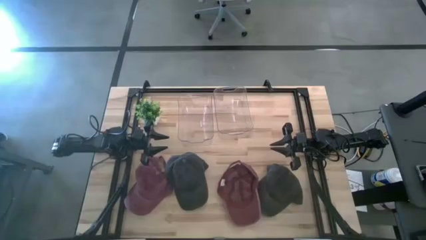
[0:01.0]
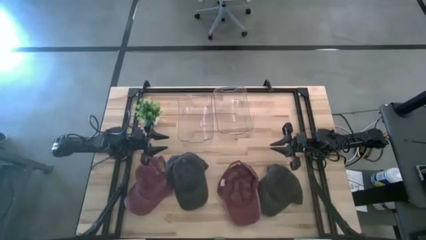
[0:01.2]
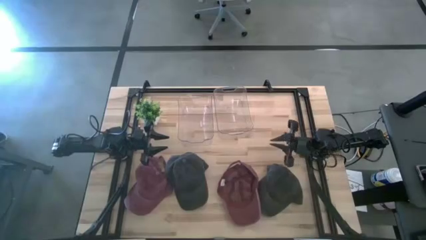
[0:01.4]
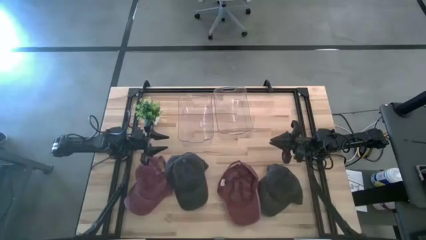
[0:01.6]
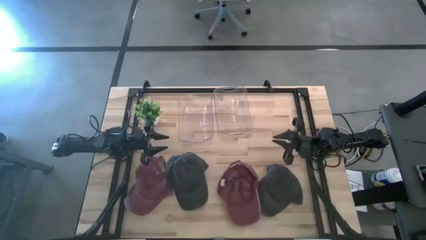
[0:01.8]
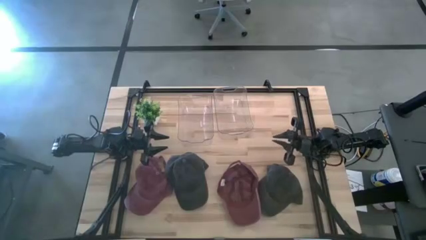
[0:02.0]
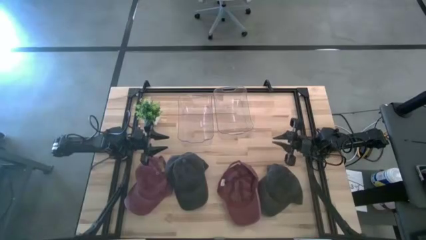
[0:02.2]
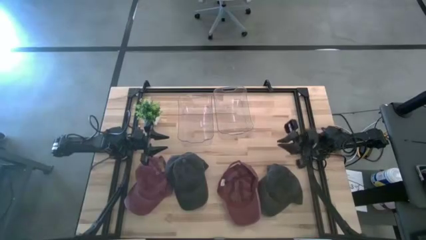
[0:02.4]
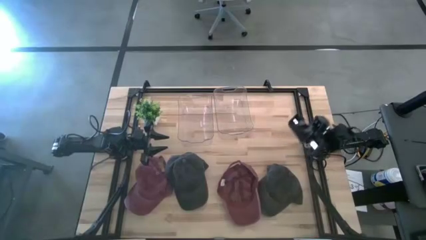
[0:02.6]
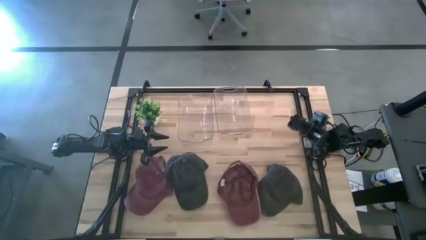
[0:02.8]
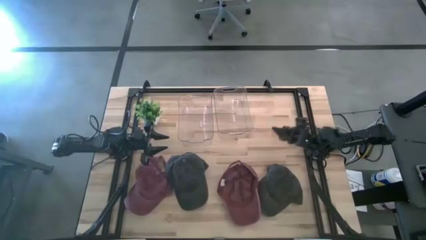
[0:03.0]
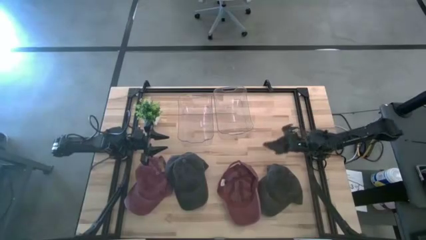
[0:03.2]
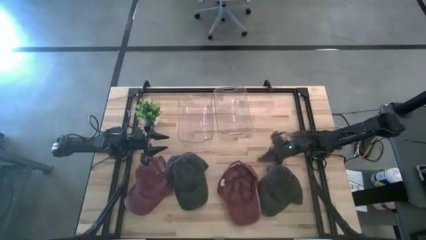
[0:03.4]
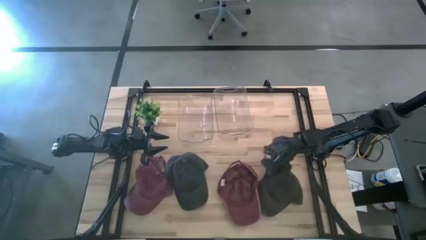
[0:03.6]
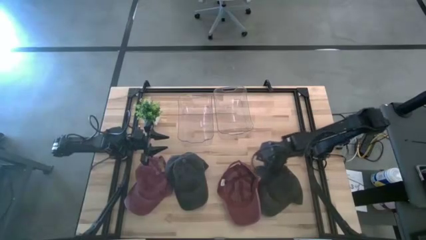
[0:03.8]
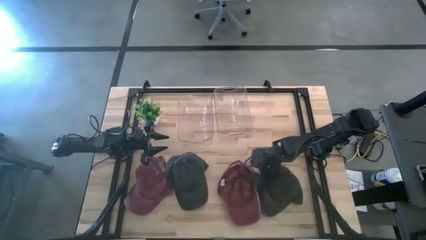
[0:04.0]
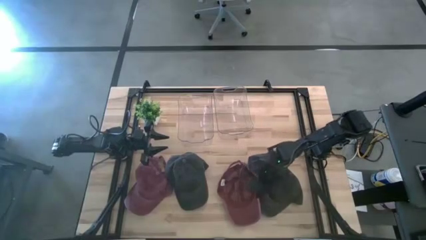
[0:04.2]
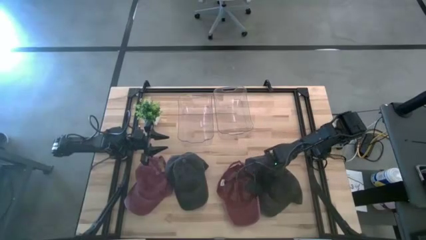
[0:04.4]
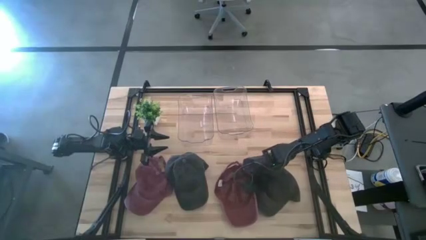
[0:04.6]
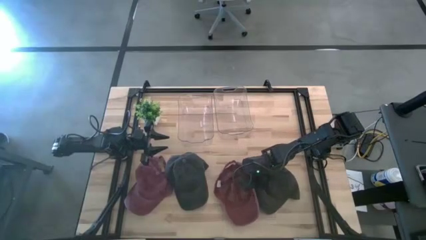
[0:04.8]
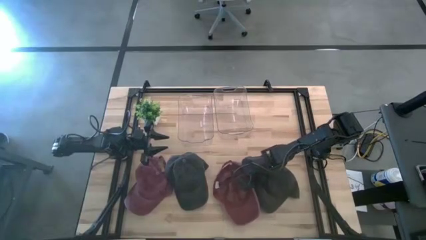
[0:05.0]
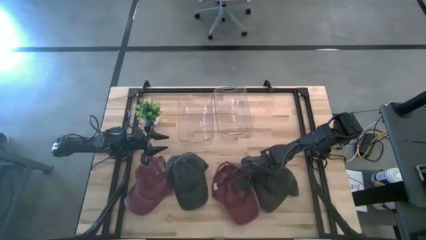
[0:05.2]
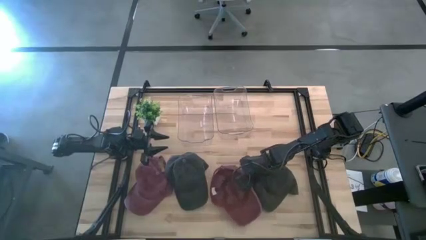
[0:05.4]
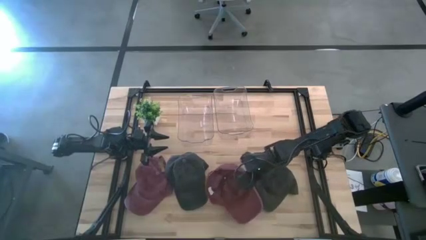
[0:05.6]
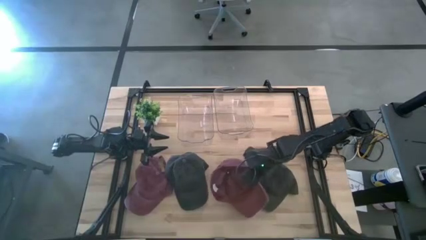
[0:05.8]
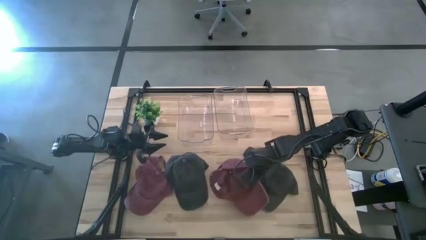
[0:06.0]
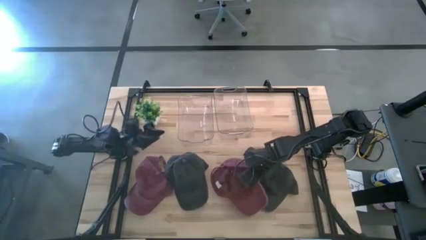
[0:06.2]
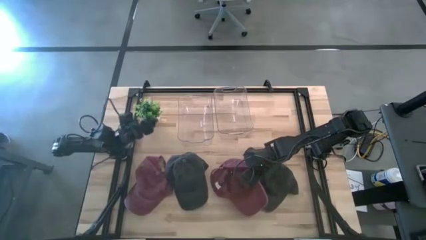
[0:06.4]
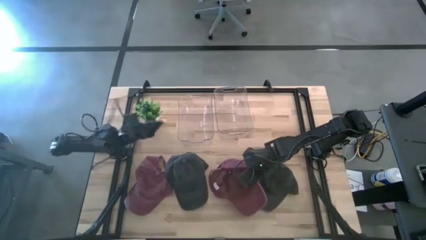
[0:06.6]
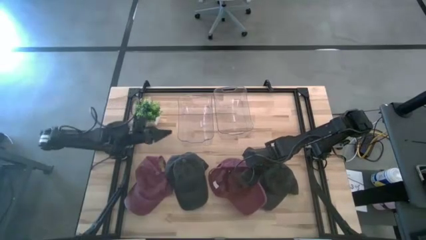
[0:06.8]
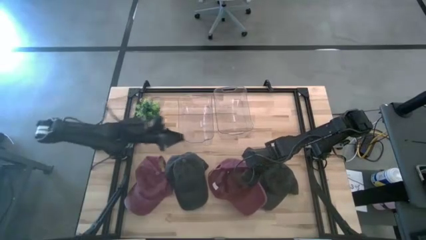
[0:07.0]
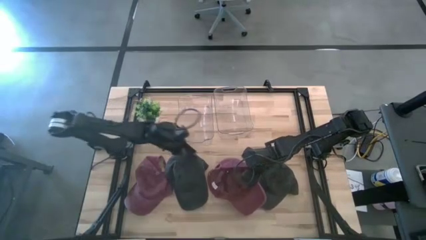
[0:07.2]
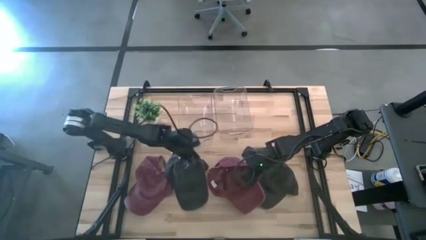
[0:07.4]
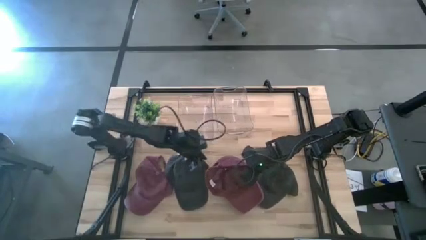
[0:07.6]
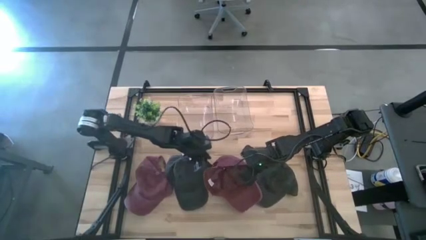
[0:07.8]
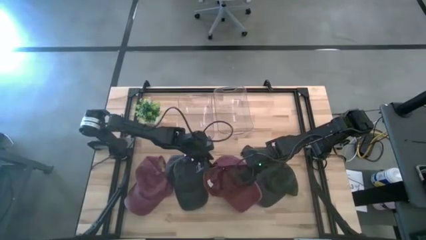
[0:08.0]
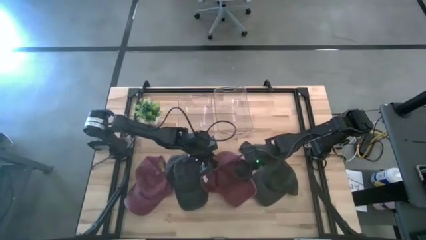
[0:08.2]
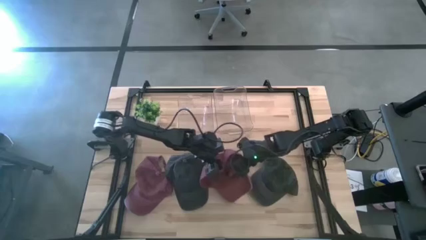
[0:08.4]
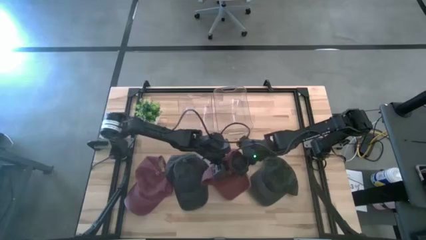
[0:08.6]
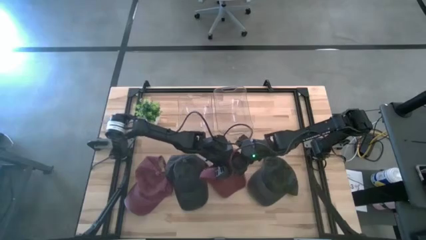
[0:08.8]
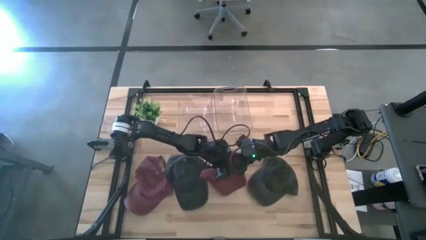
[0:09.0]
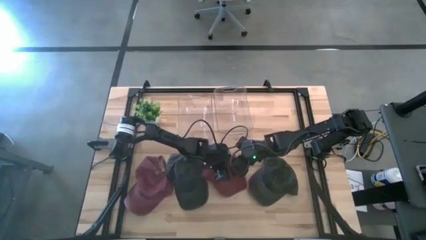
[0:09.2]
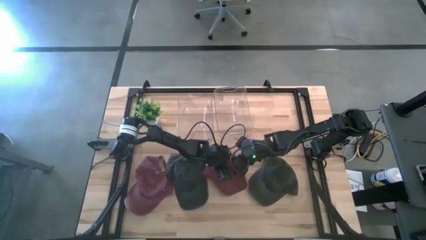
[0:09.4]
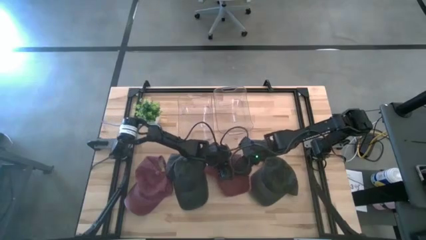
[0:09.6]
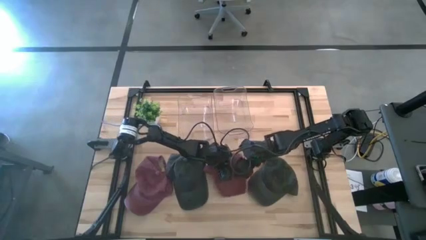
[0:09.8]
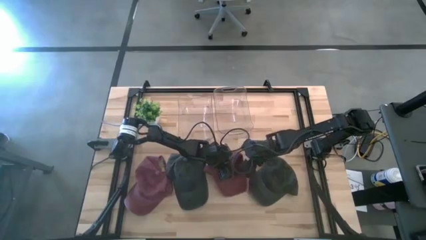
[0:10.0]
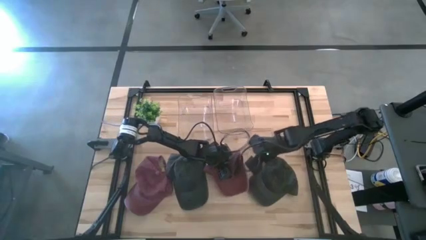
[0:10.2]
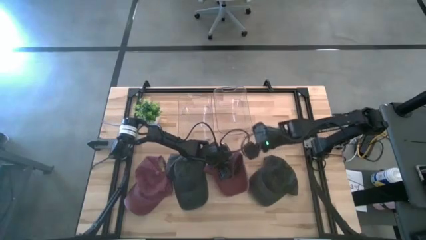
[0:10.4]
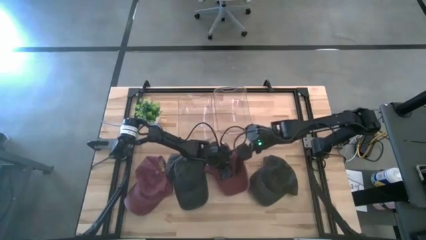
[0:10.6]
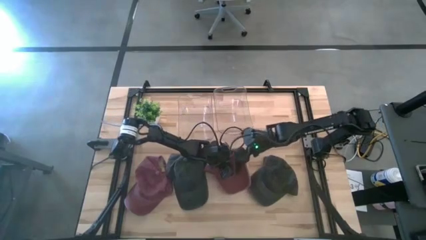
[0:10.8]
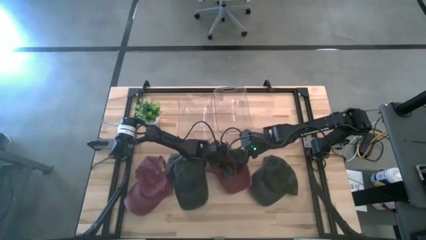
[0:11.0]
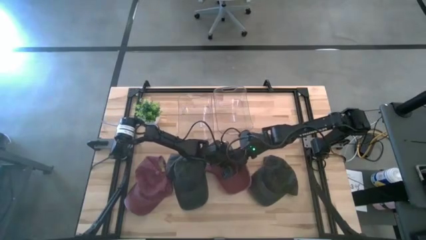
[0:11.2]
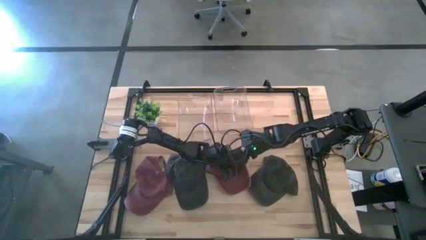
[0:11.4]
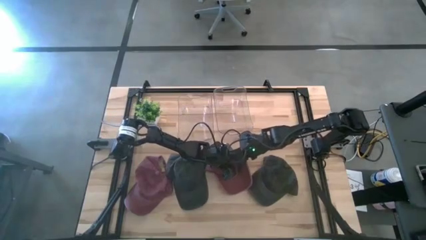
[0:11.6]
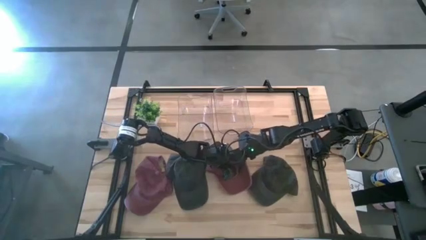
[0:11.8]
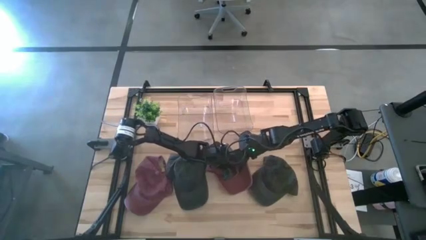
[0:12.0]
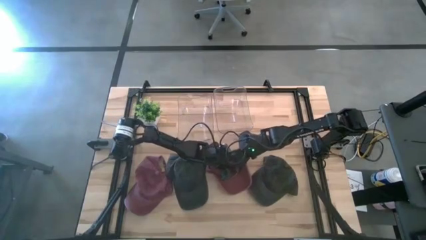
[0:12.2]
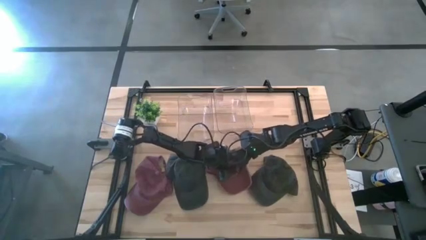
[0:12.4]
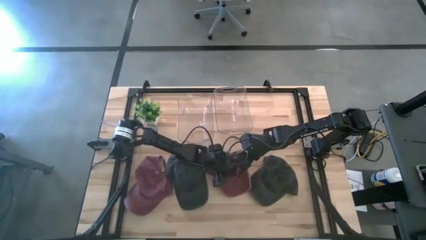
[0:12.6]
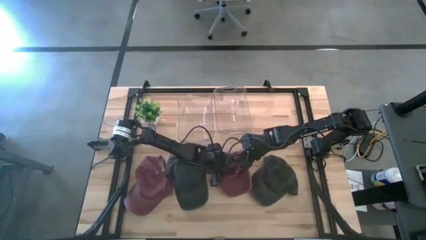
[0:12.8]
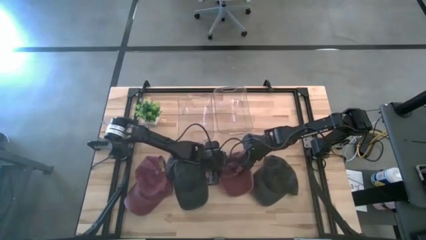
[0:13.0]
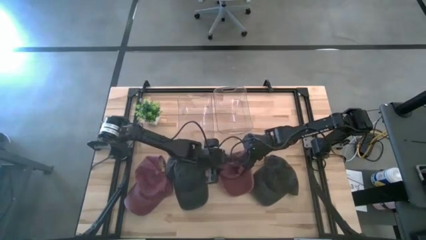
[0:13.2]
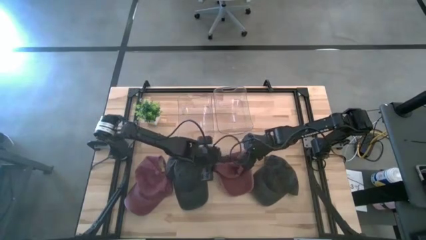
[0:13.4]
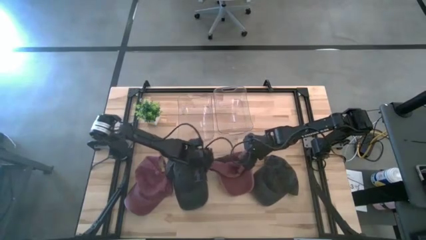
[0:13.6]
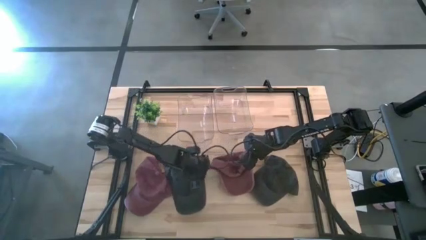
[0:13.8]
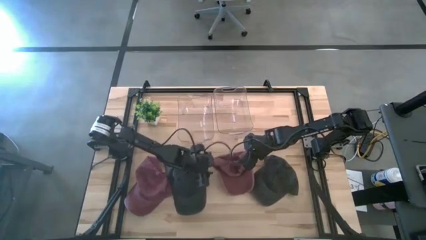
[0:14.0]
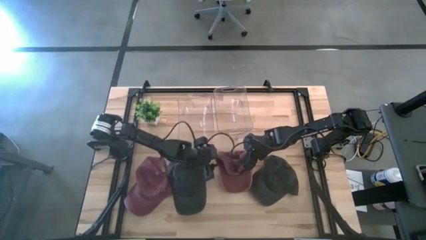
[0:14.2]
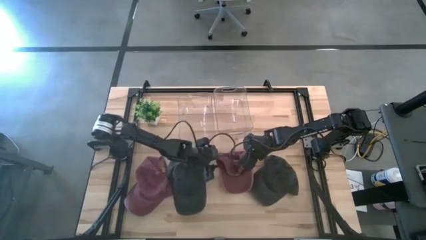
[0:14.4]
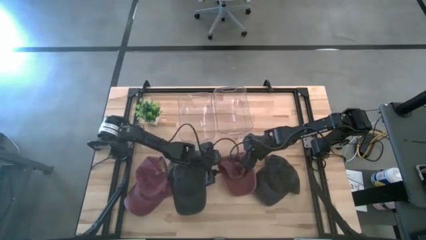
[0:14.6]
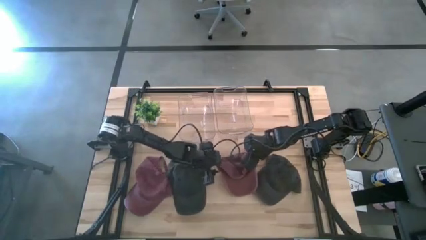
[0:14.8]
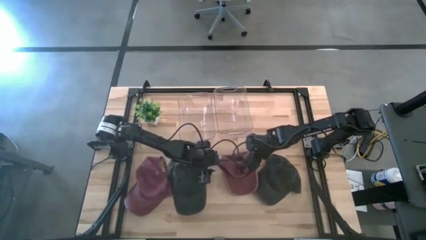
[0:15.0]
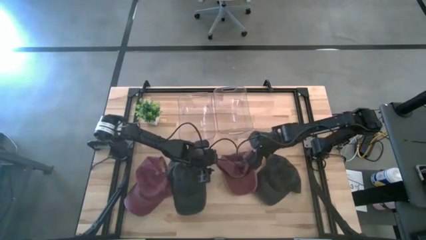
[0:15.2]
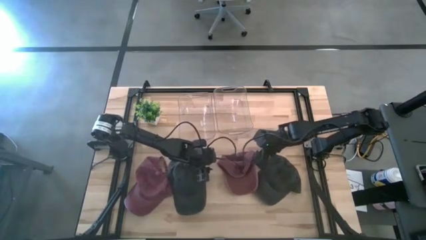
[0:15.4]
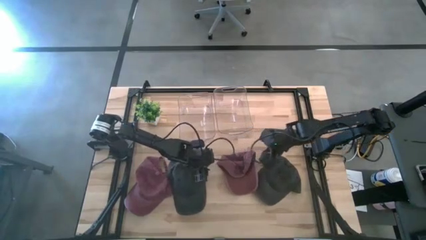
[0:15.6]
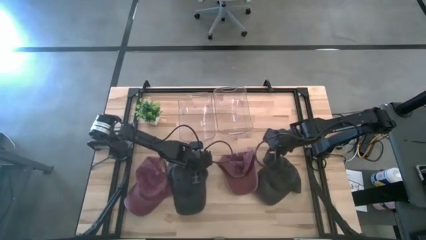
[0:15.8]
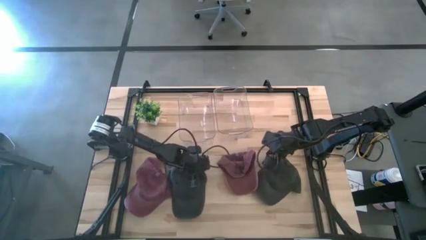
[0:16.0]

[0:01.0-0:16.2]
Task: Pick & Place hat
Put the right red cap into the right transparent bin
